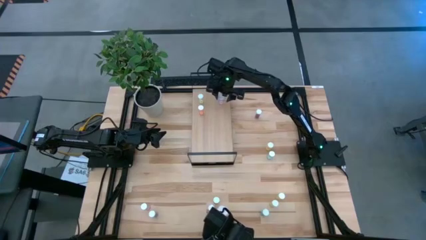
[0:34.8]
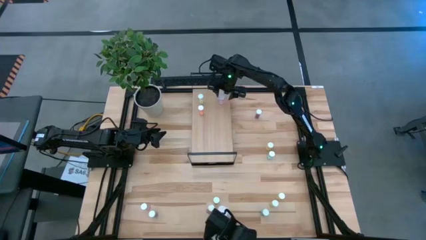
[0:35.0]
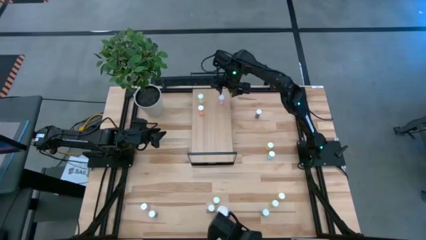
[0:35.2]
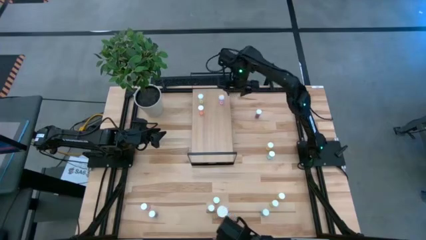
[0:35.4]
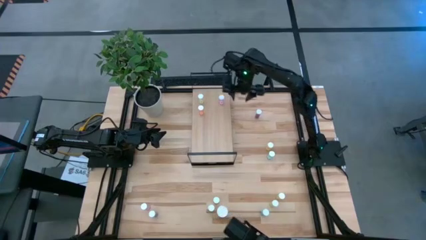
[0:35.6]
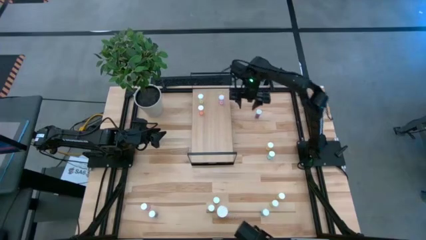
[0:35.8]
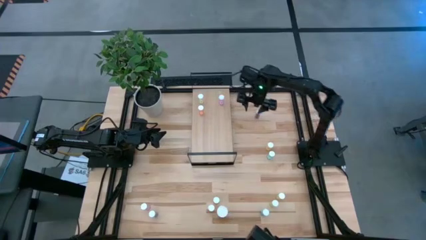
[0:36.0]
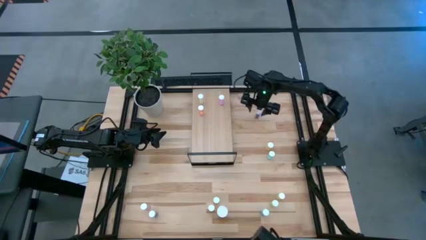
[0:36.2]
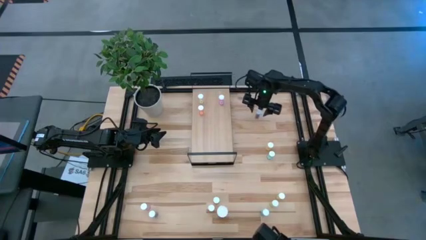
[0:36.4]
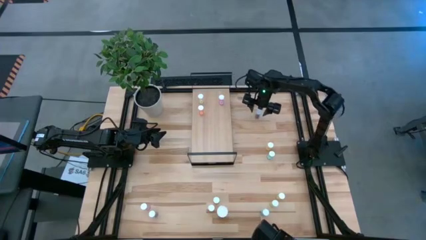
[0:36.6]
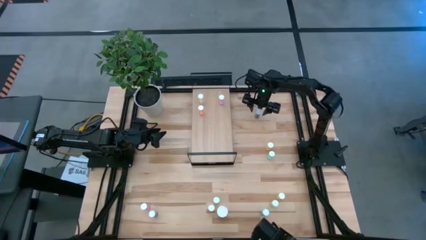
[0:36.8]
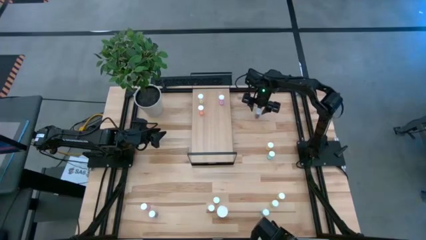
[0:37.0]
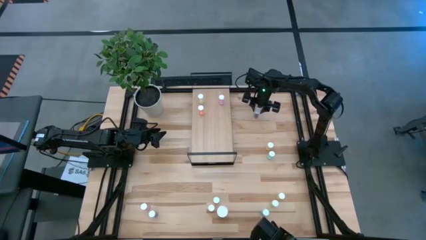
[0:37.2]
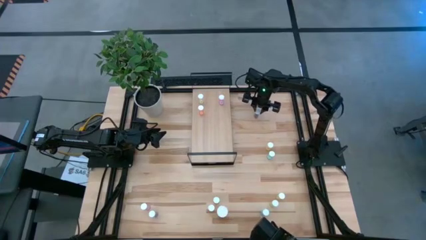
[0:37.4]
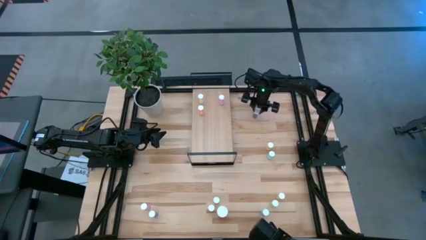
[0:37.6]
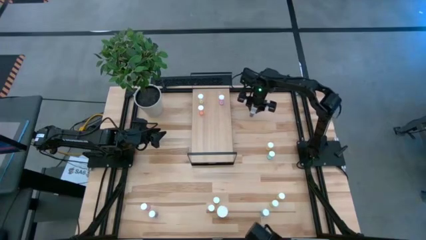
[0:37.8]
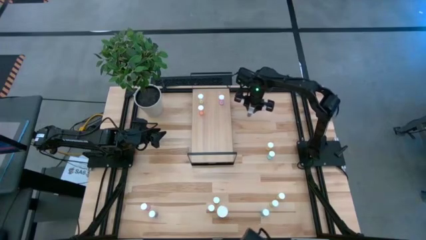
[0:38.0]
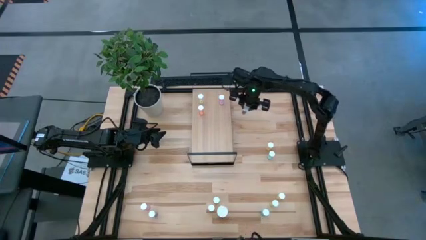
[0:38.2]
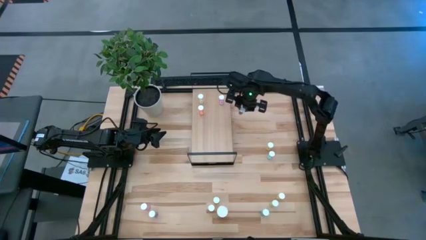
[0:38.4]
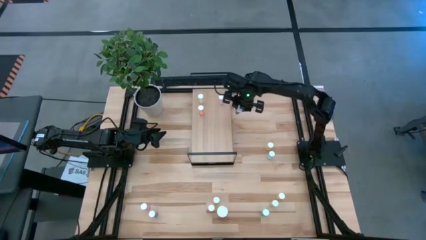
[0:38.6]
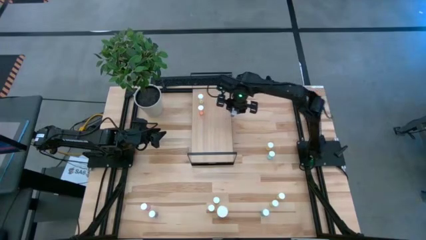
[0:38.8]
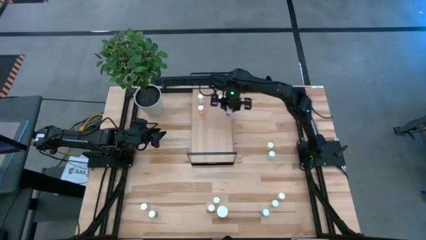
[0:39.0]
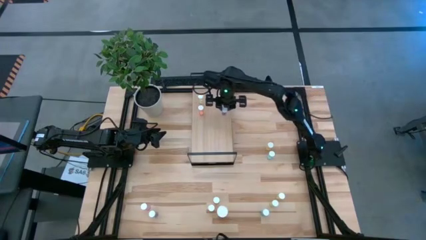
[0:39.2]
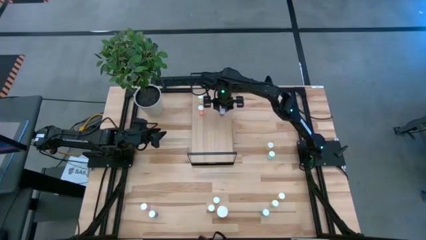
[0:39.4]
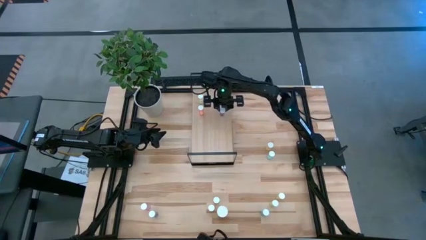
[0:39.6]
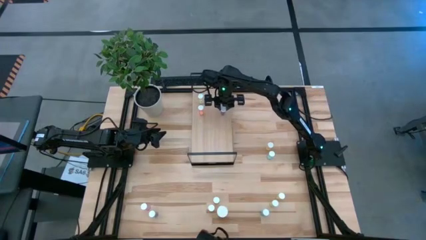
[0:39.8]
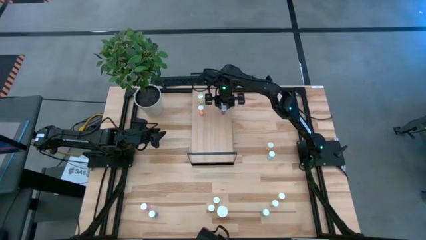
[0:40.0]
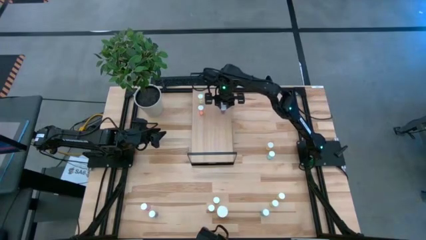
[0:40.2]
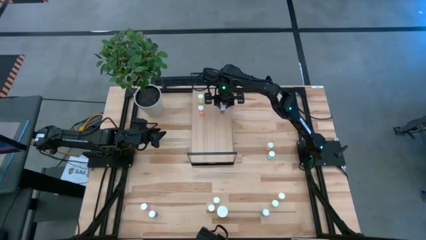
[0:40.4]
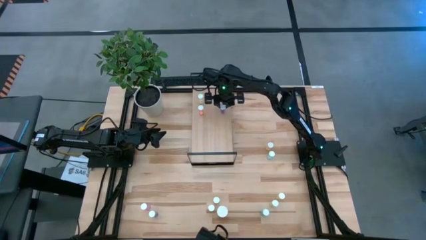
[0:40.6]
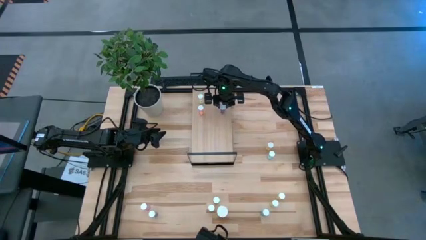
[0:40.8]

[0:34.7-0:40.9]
Task: Pick and place medicine bottles onto shelf by color
Put the top blue pill bottle on the shelf

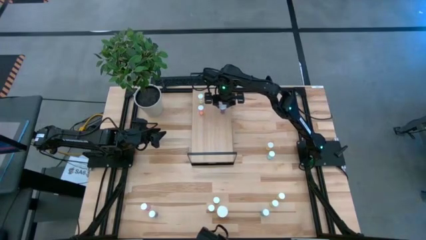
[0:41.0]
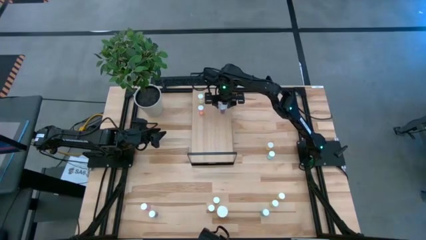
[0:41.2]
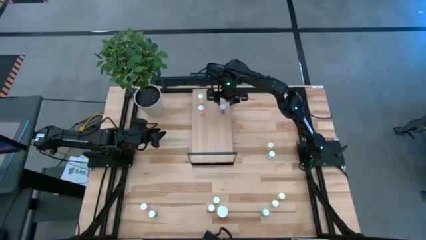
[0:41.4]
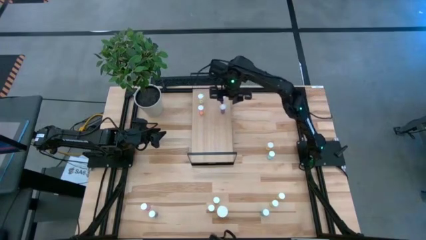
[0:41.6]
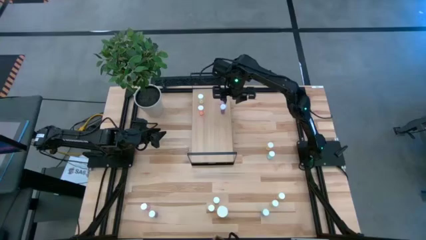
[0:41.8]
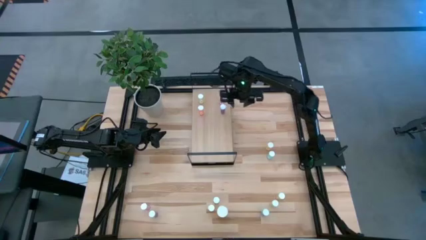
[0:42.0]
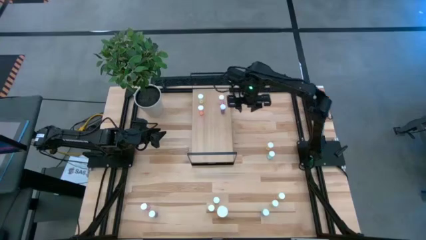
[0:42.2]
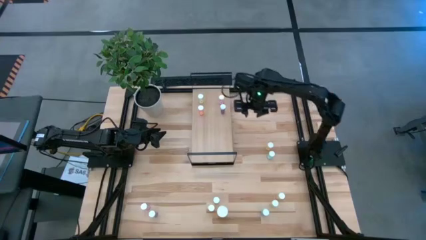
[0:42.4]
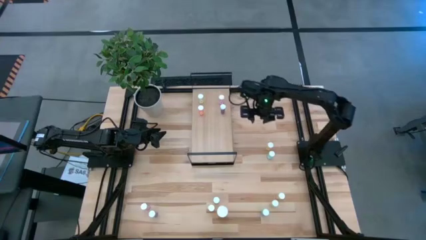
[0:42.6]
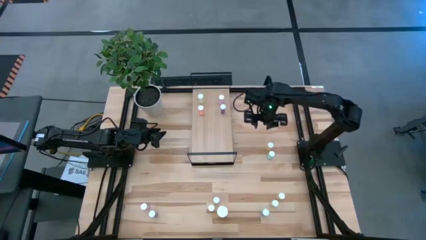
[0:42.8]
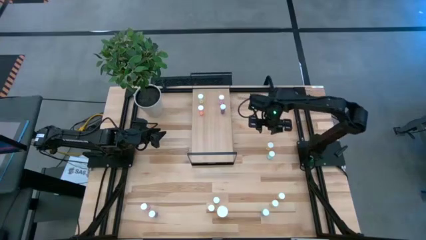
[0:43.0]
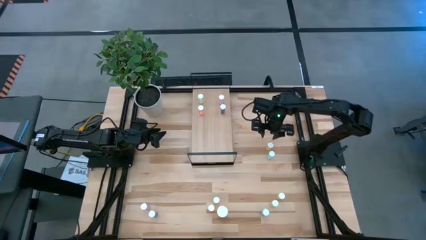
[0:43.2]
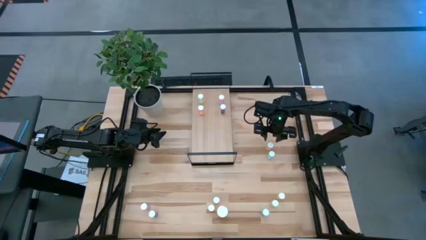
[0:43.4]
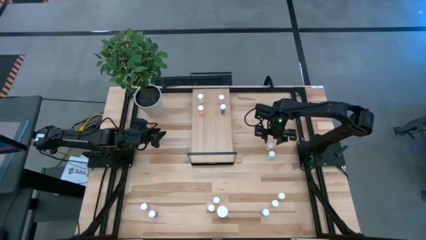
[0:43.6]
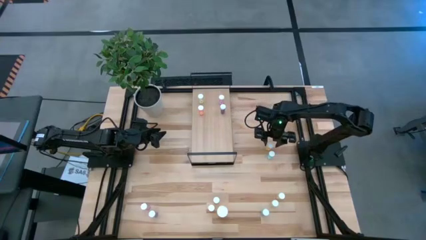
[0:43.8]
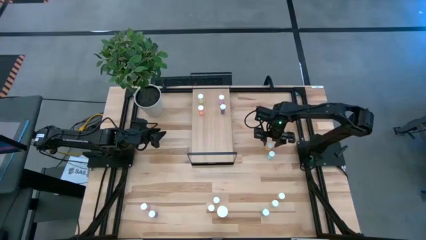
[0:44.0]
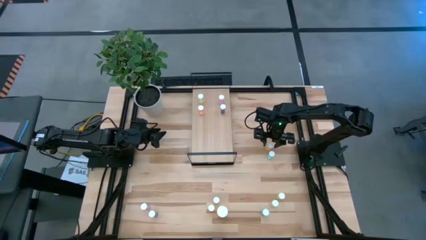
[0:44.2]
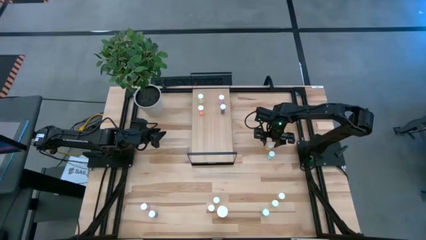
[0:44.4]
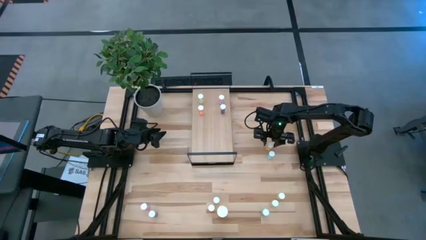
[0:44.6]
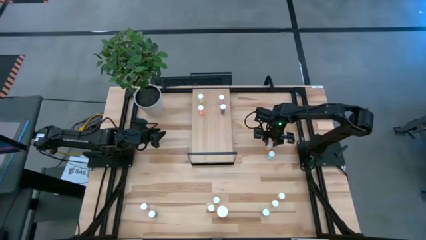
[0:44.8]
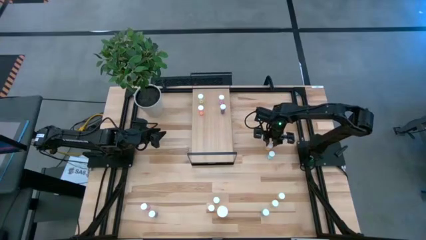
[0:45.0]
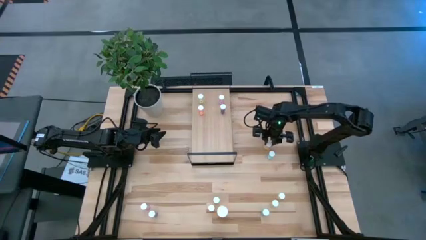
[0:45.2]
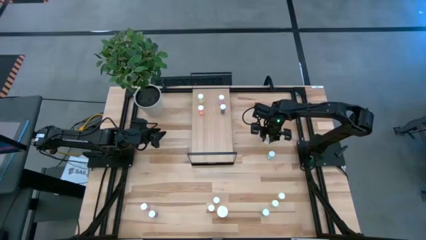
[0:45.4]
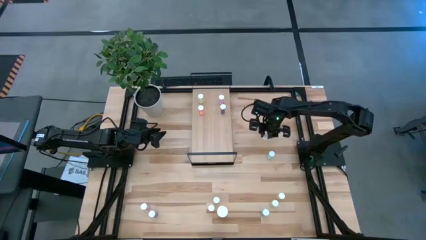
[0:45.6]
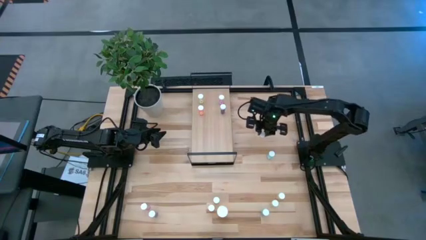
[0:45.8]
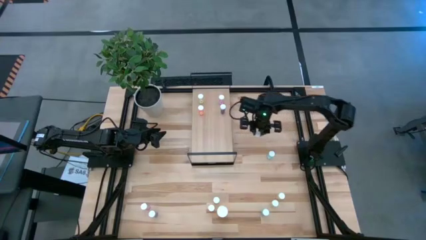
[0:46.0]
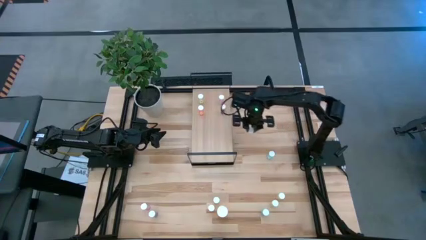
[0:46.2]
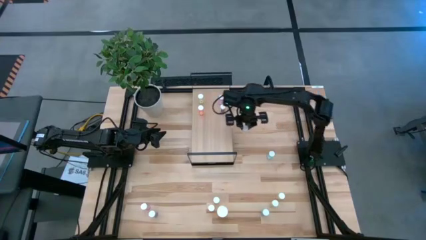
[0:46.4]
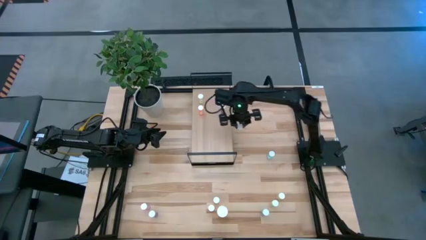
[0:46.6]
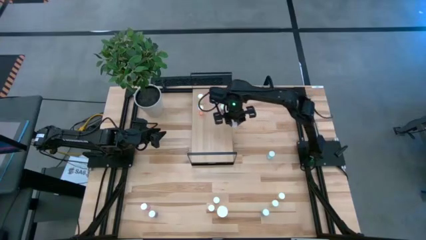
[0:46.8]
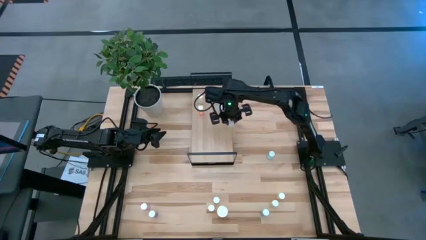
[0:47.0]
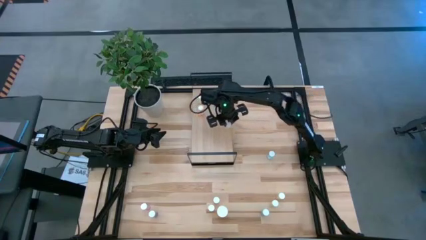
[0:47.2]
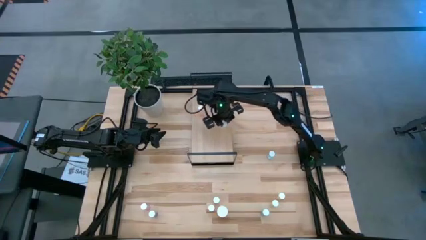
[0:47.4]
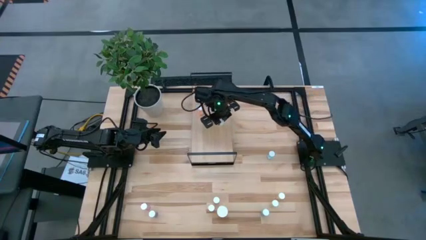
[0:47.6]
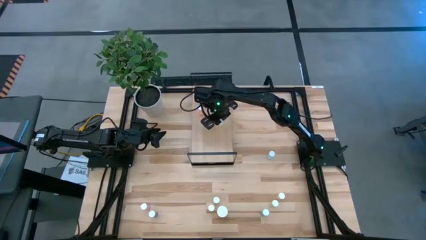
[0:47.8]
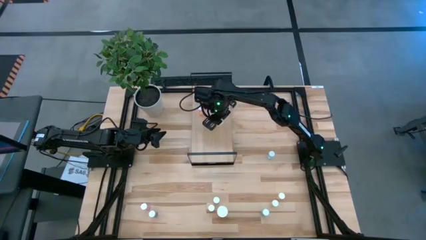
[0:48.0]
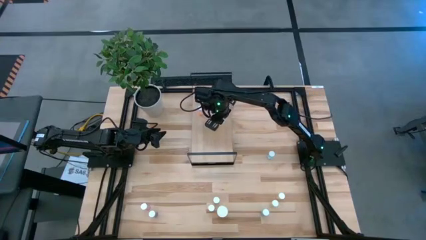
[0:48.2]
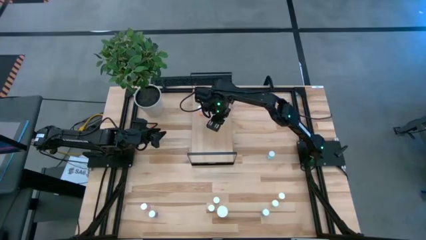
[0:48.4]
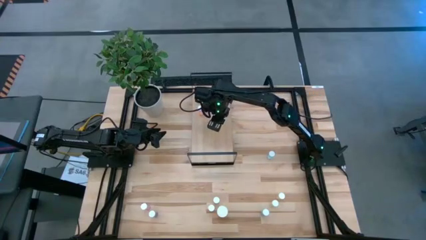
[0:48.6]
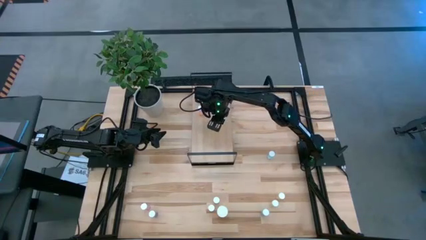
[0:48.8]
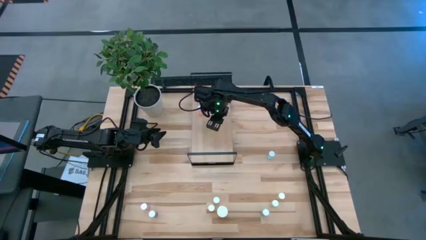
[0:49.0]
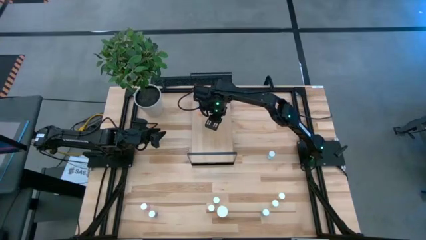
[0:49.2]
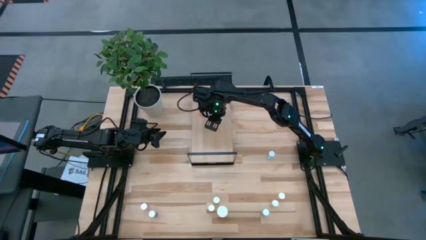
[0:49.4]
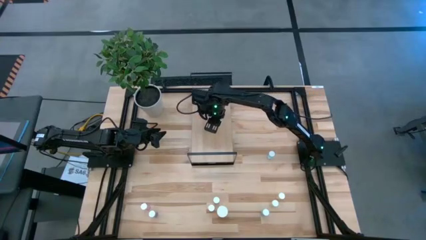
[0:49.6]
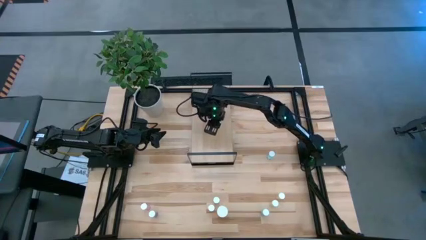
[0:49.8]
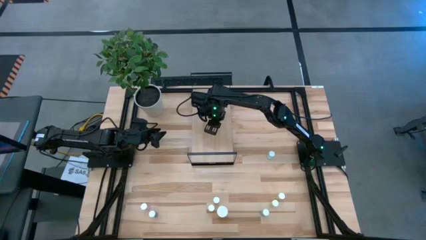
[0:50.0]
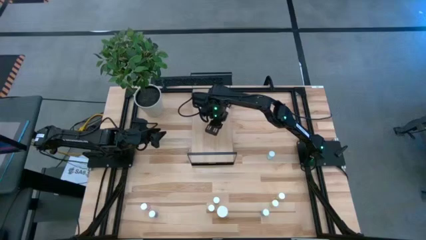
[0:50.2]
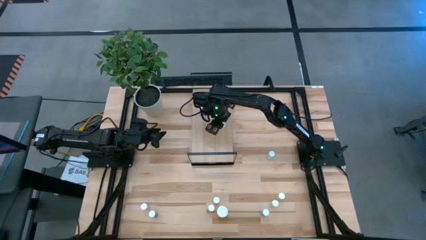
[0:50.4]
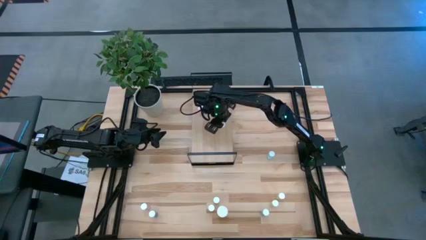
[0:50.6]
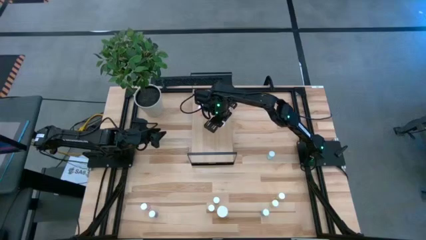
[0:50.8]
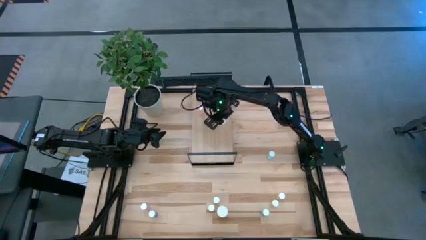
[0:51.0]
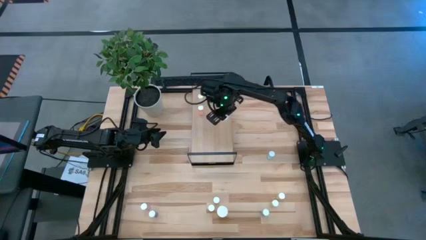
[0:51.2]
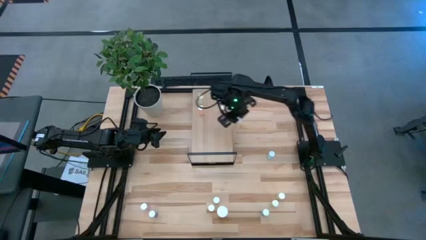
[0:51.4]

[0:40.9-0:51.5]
Put the yellow pill bottle on the shelf
